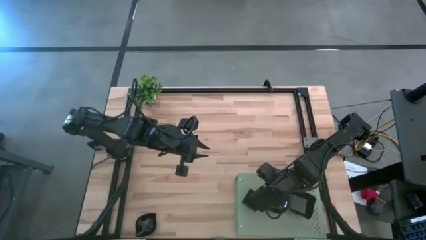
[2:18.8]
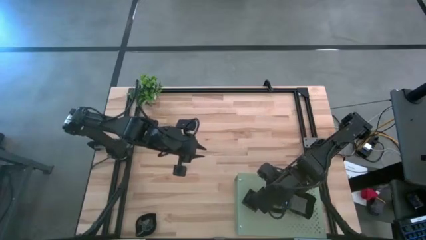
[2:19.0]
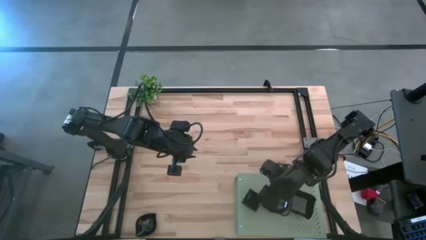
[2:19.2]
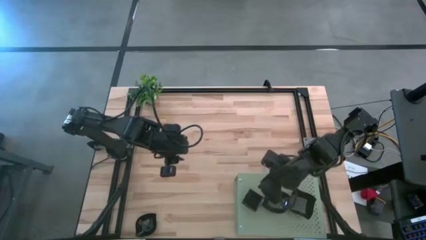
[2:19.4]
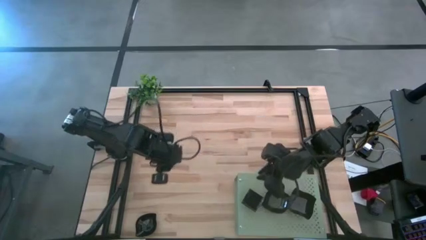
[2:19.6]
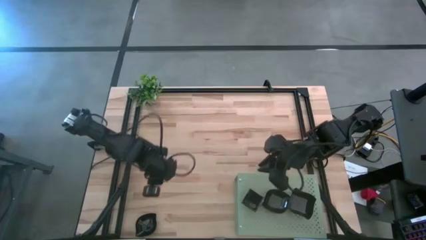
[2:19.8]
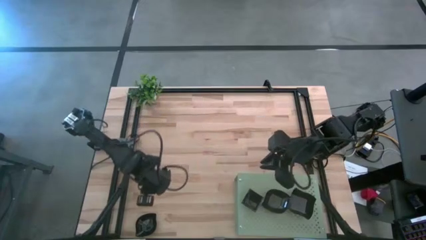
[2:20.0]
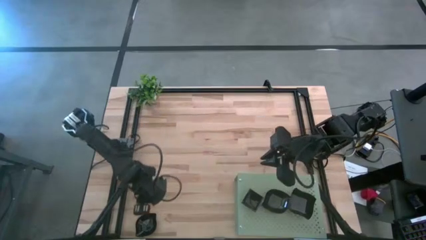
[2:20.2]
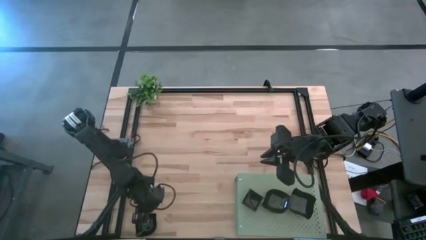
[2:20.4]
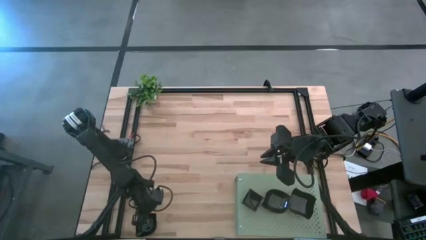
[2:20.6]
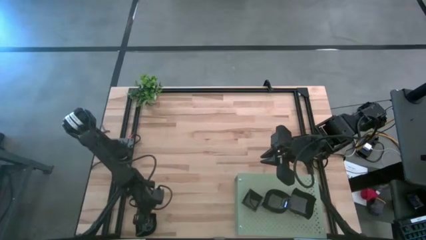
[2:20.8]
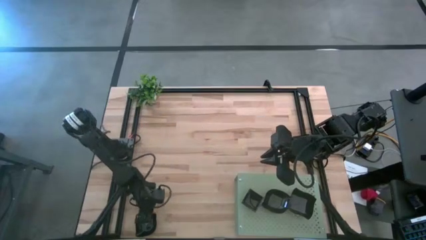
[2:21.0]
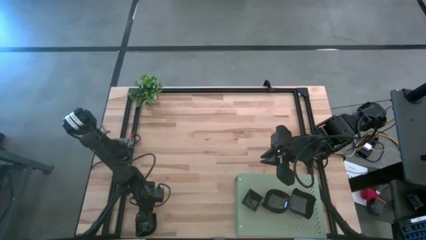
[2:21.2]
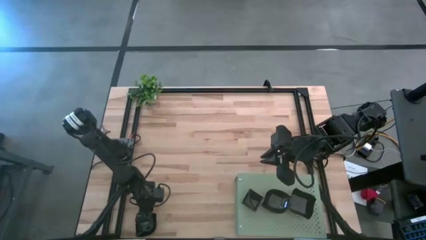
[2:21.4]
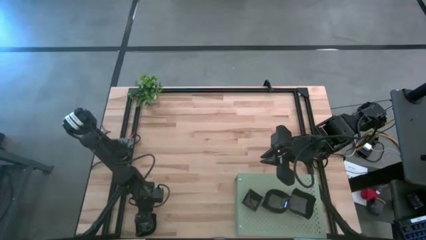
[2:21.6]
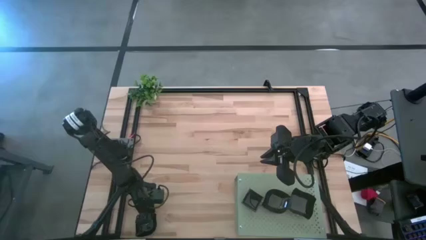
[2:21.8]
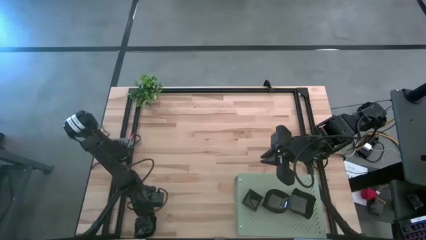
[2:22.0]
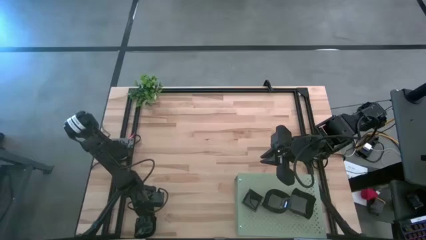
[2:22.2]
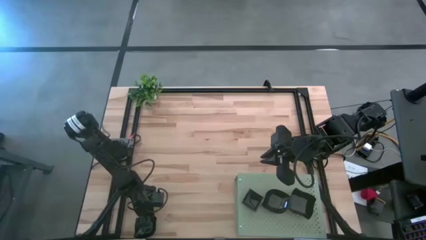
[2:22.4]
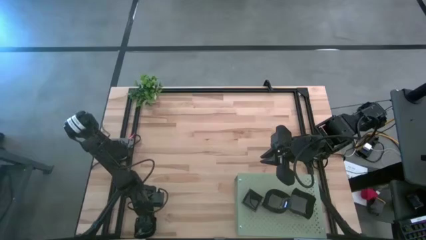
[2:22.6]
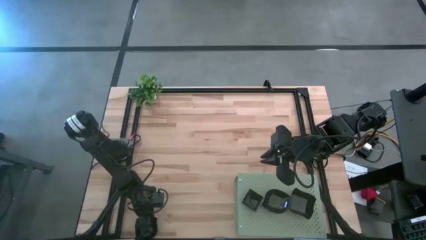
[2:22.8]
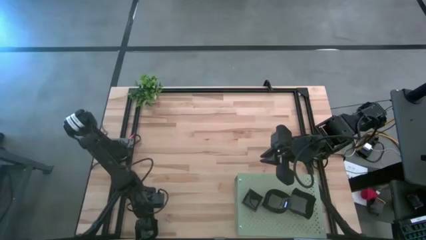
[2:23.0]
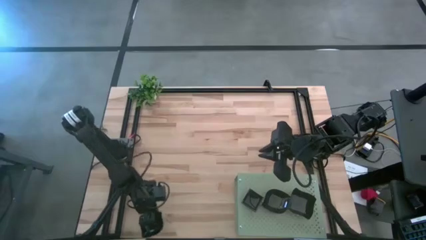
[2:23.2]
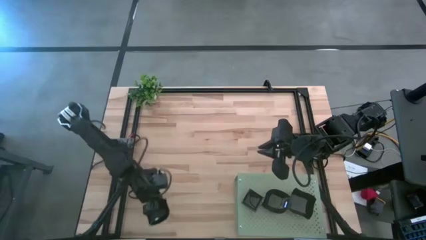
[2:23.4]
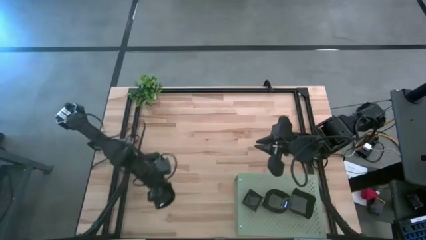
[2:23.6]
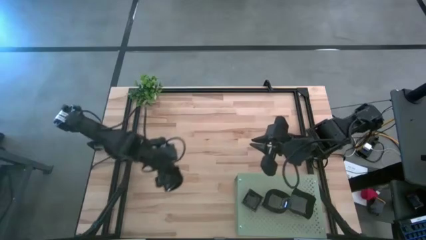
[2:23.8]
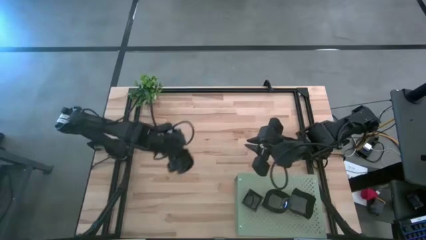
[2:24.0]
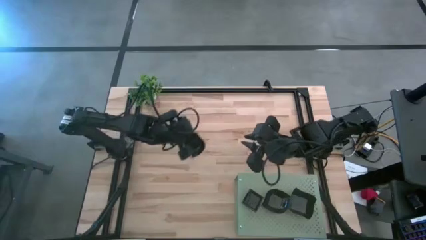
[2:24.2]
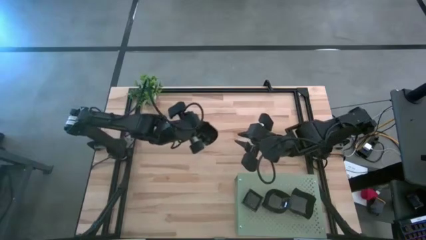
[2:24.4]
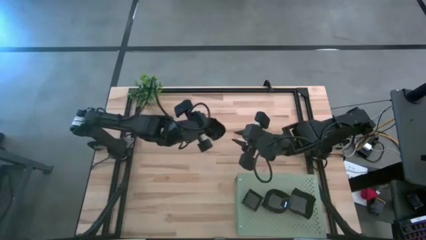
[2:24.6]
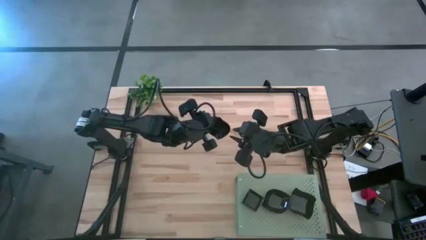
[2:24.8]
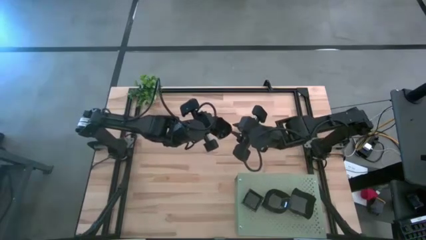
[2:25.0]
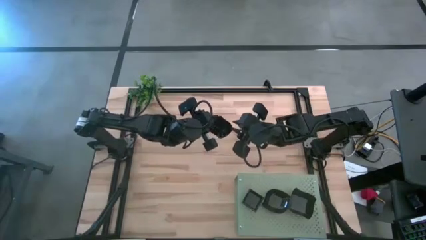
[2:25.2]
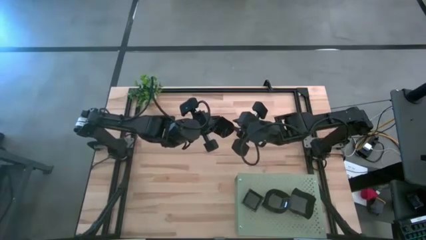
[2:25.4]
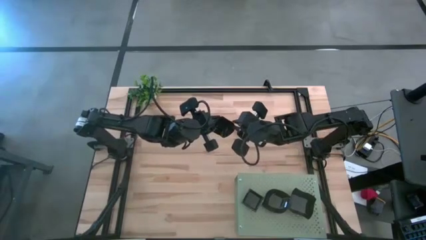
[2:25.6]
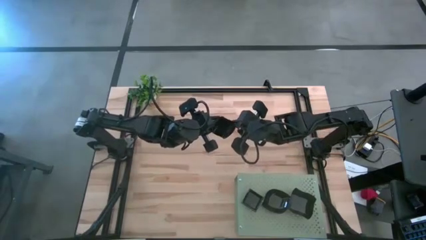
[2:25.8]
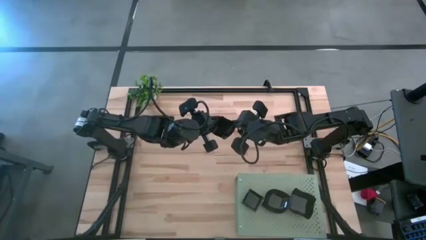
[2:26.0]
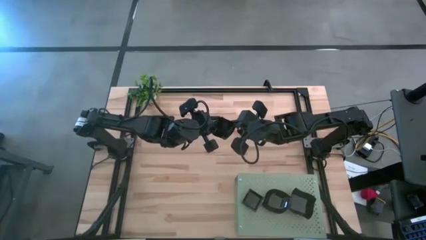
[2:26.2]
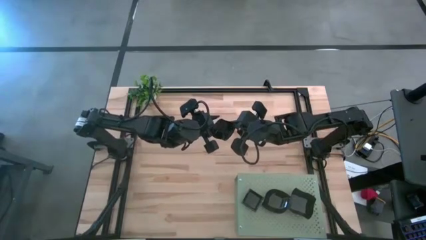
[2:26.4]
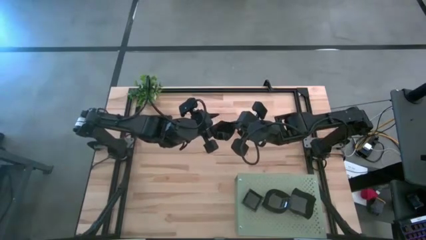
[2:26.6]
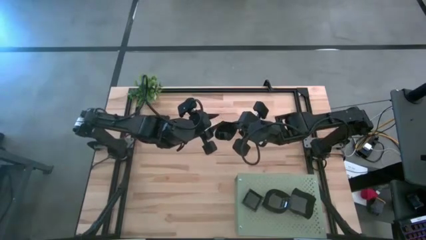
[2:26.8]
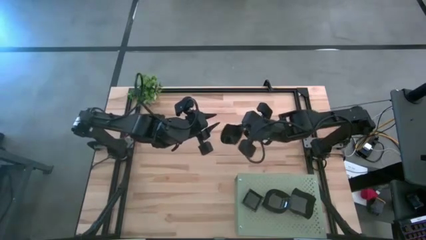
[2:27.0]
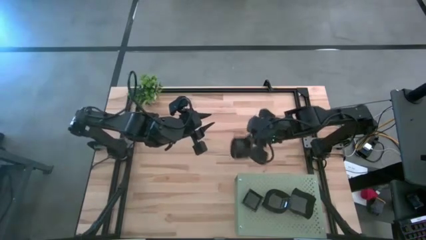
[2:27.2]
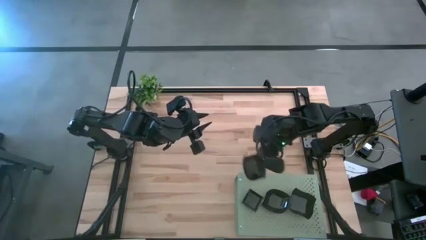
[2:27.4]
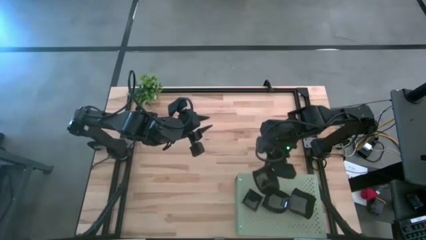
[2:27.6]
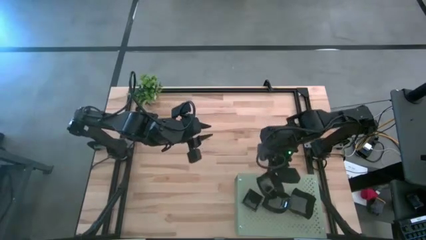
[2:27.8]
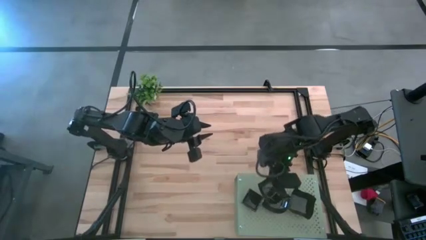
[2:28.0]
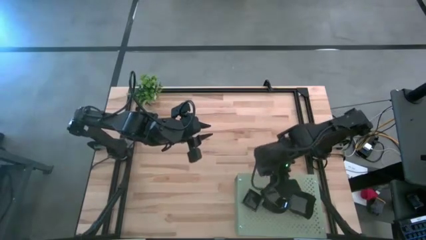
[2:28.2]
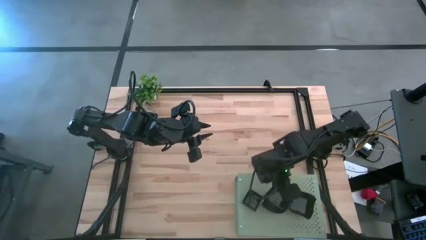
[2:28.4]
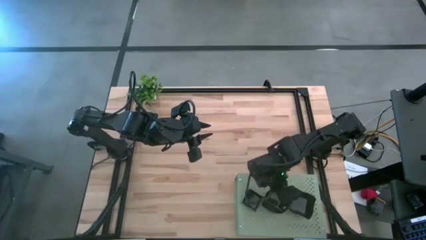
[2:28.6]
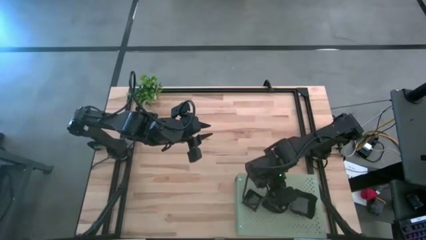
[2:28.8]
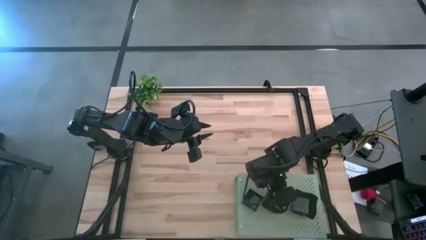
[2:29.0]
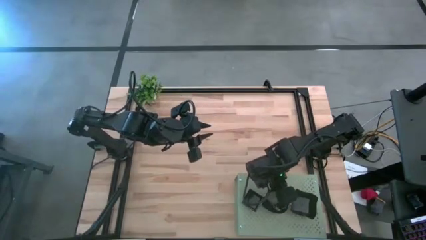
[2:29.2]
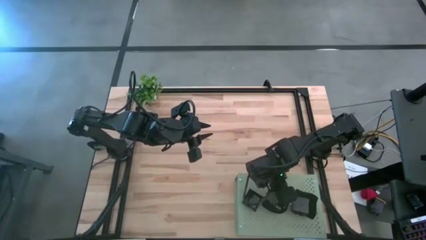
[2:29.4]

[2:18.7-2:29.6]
Task: Pick & Place Mini shaped plates
Stack the leaf-shaped plate on the leaf-shaped plates on the shelf
